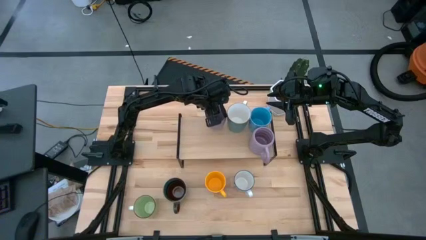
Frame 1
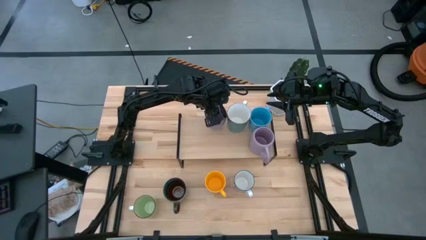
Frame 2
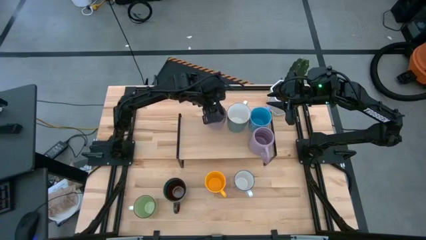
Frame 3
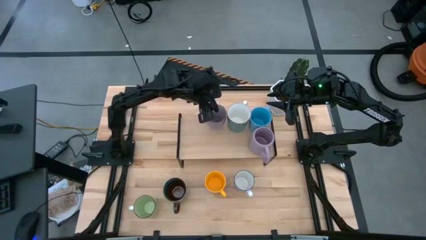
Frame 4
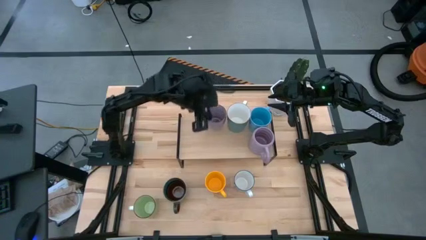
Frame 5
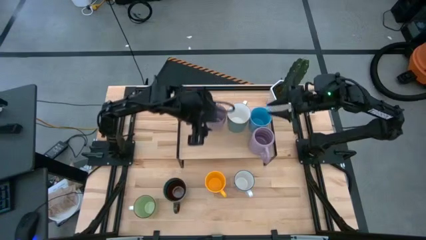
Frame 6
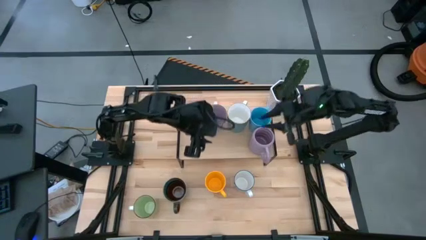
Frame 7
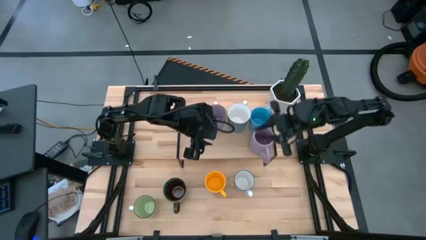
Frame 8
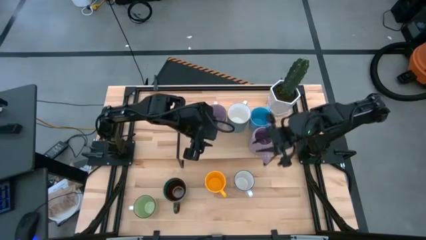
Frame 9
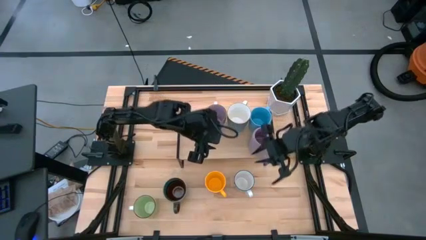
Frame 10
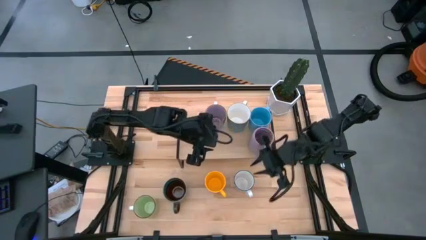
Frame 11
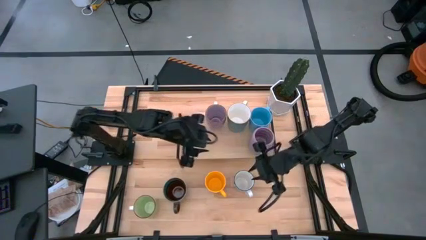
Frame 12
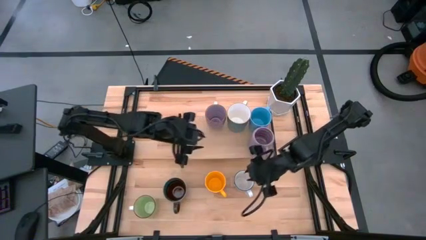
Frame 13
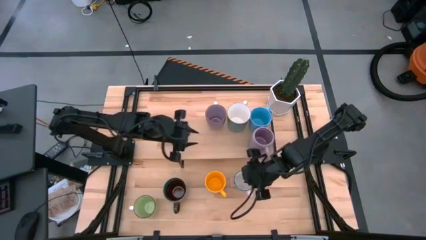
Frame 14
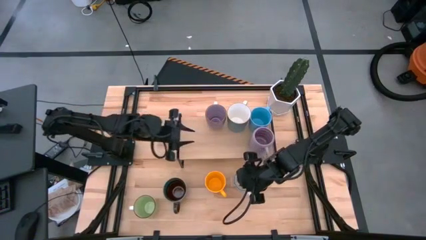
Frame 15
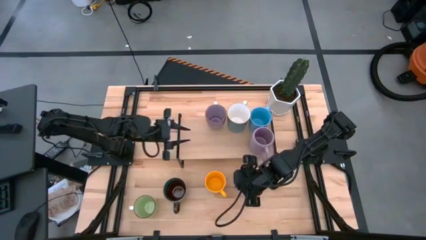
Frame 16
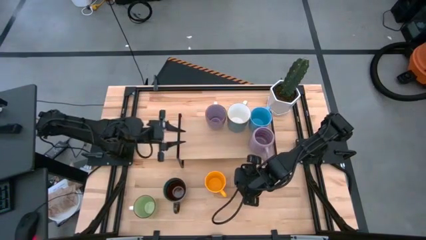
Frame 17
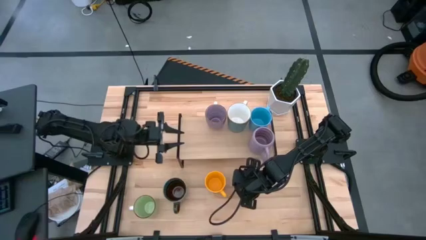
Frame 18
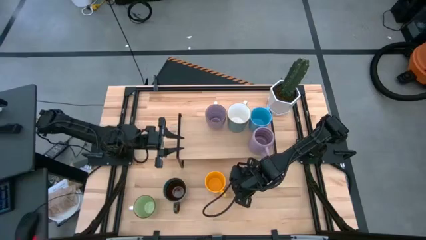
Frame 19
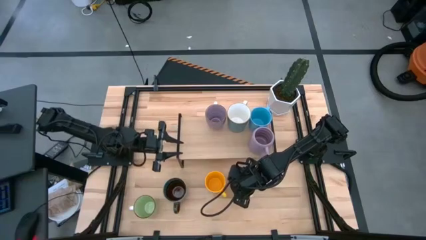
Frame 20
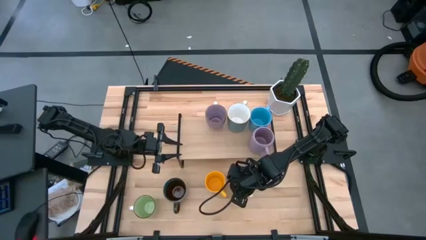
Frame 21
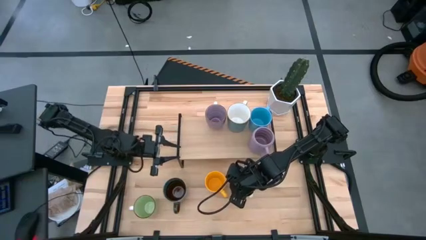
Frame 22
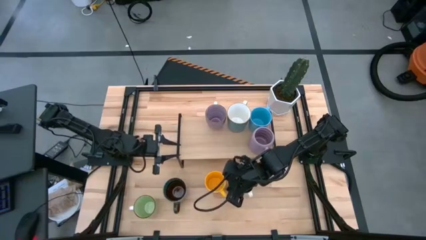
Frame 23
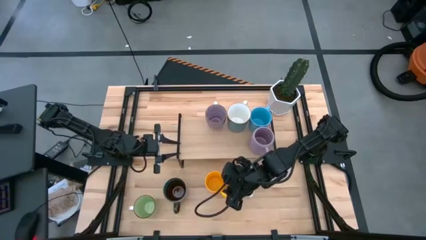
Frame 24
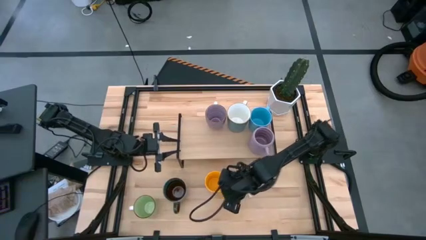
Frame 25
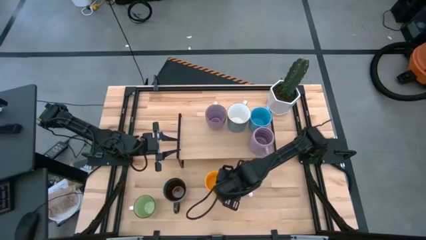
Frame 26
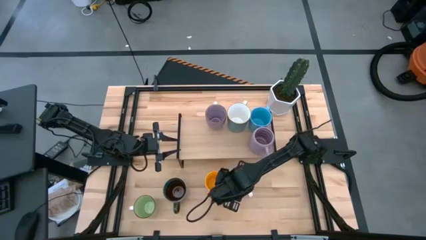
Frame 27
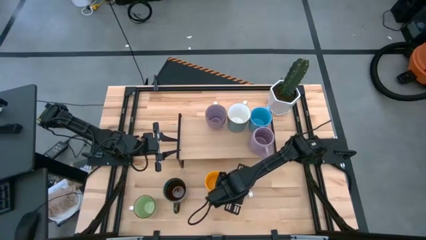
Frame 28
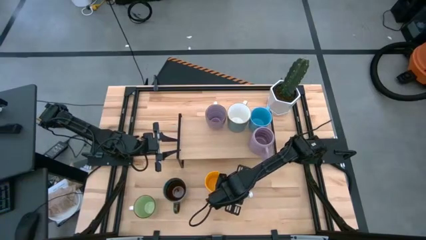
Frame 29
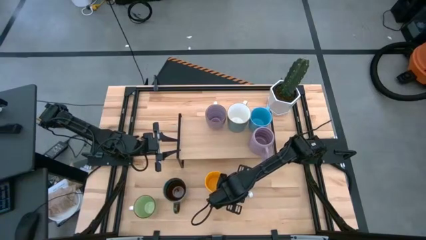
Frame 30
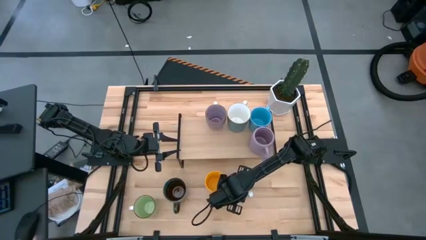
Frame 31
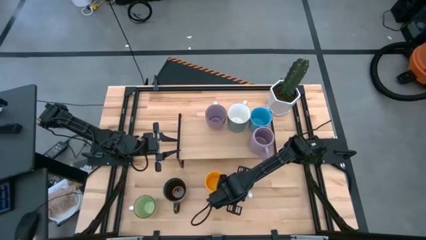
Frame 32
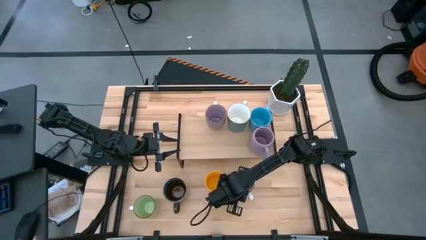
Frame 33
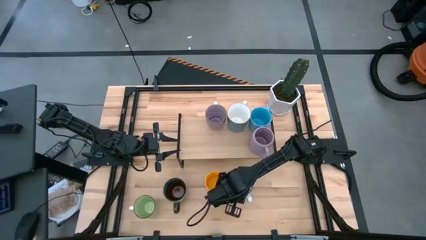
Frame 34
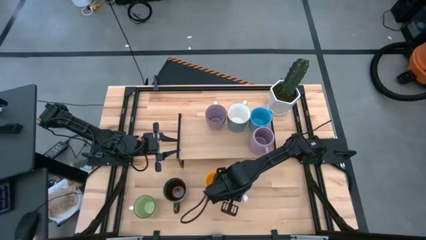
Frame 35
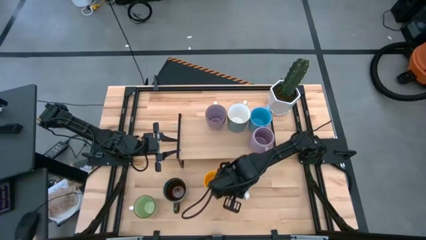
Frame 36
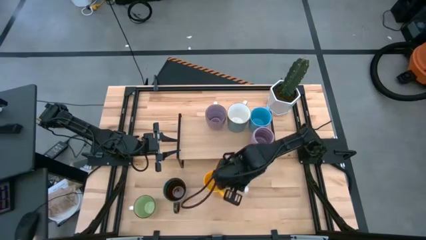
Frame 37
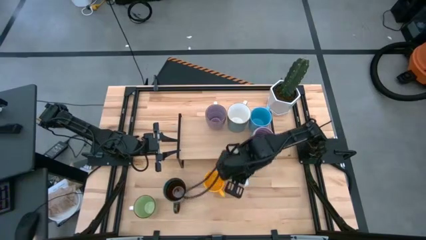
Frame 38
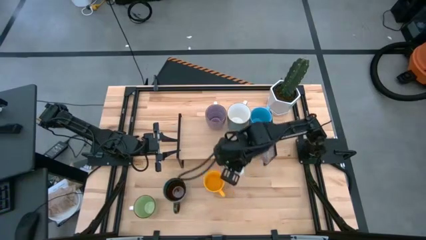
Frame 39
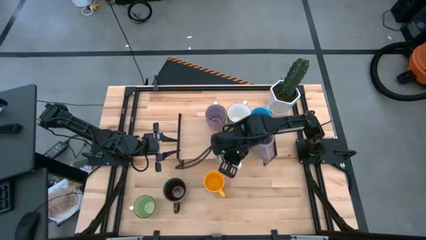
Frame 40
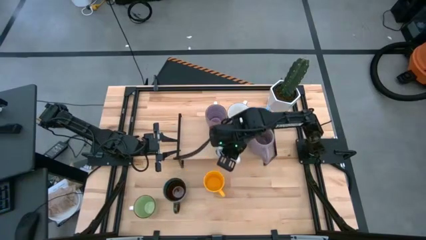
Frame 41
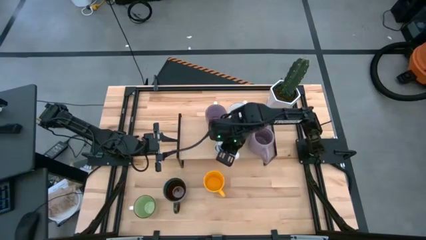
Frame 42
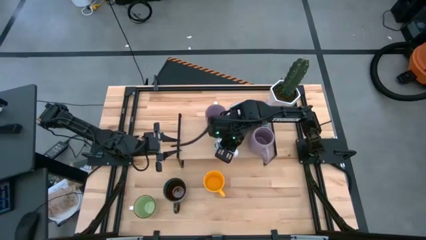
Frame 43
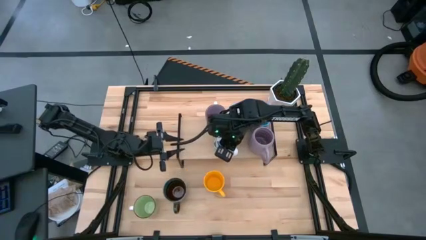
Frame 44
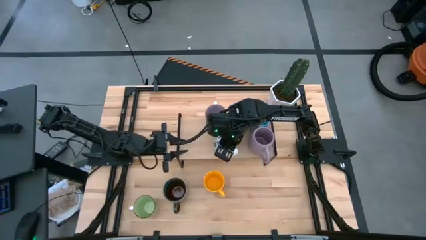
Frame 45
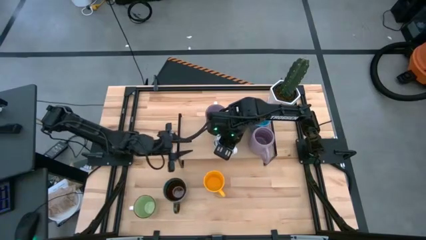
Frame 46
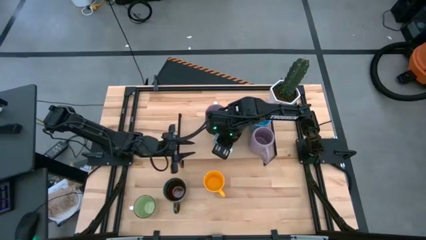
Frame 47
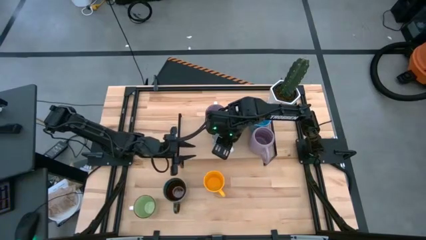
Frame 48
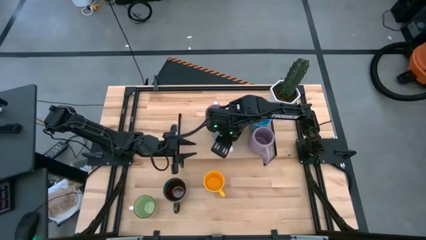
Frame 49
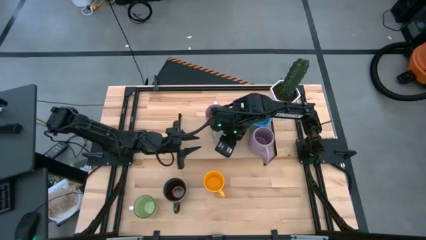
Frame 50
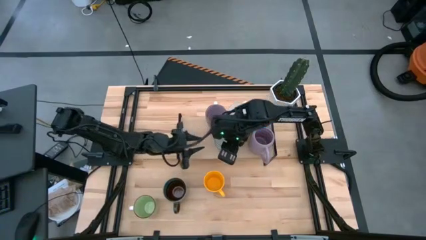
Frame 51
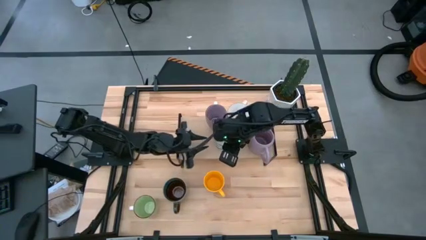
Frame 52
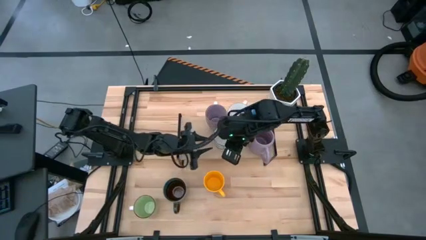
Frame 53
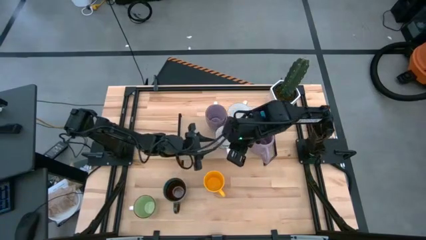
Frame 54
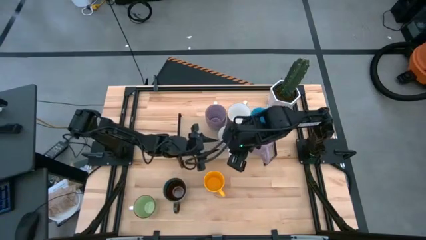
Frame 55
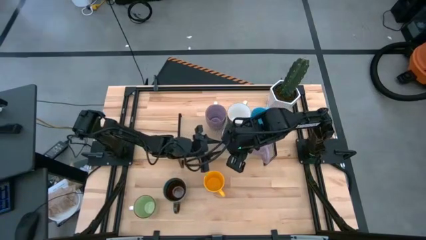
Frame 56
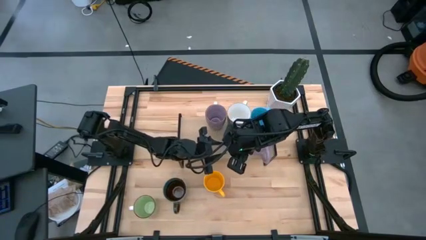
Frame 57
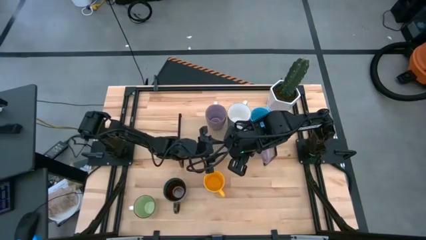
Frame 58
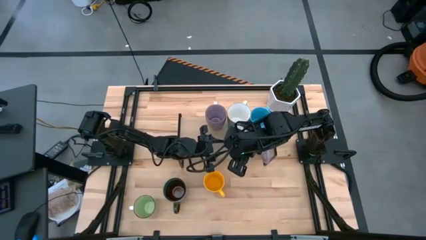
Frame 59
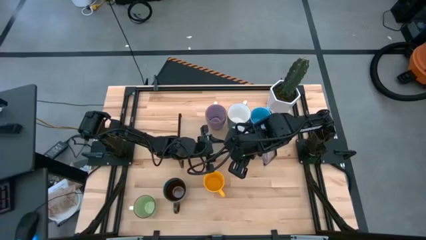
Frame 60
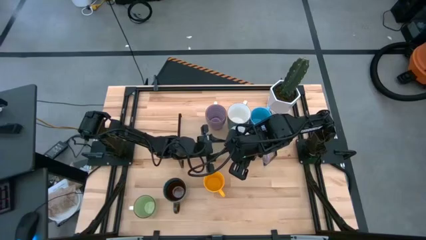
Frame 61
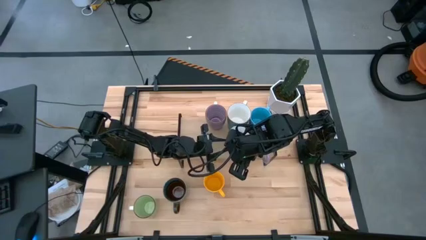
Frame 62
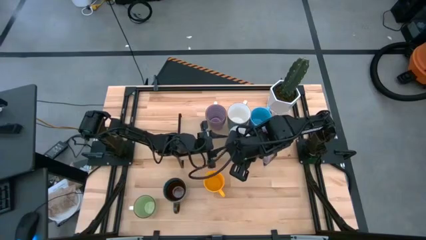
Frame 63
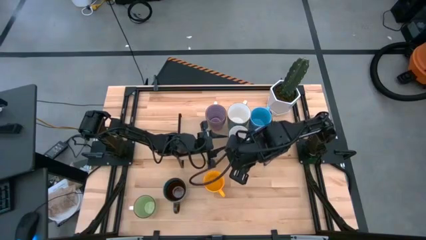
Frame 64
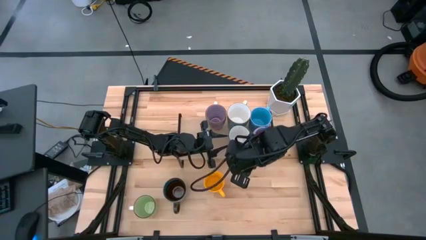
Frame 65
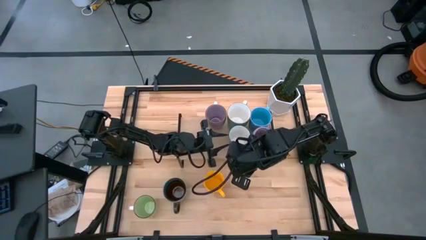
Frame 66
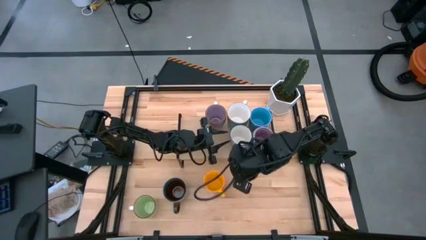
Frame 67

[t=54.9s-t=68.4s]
Task: Place coffee mugs
Put the dark blue cup on the shelf aligned with the dark green cup
